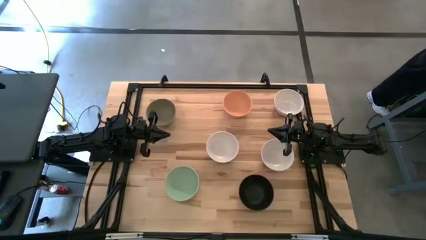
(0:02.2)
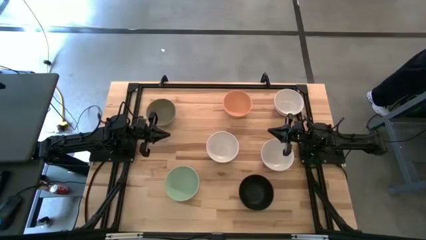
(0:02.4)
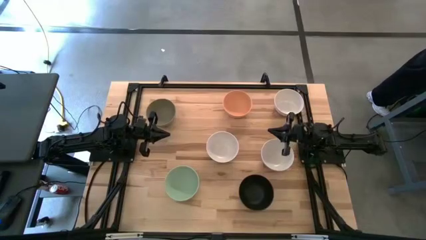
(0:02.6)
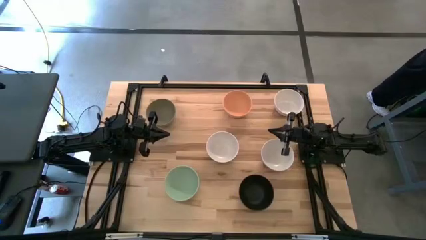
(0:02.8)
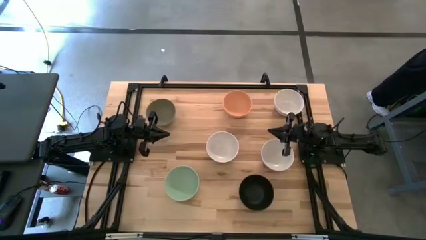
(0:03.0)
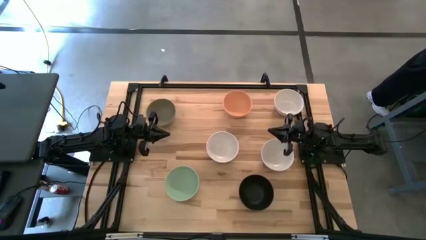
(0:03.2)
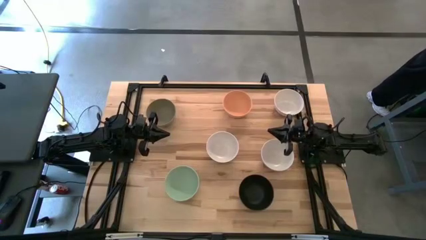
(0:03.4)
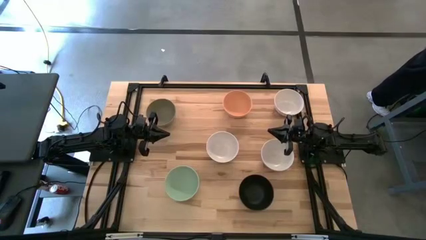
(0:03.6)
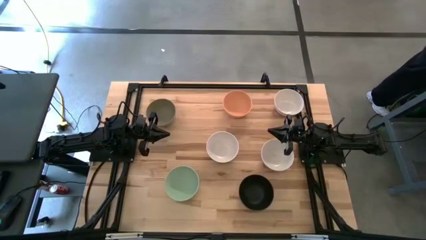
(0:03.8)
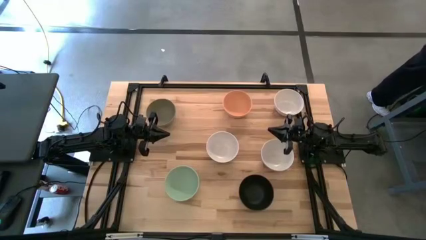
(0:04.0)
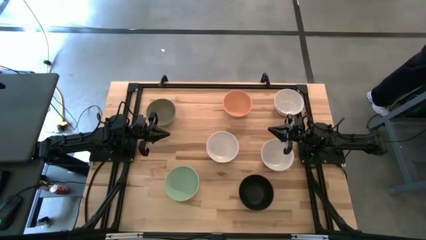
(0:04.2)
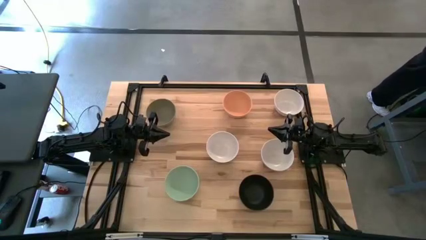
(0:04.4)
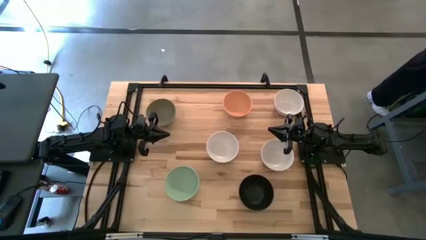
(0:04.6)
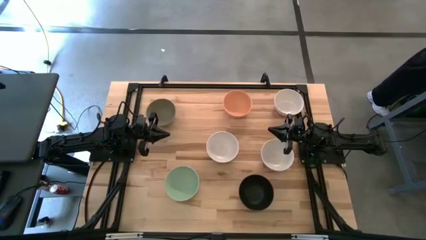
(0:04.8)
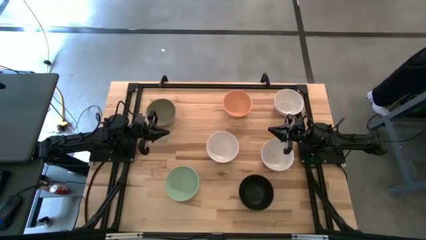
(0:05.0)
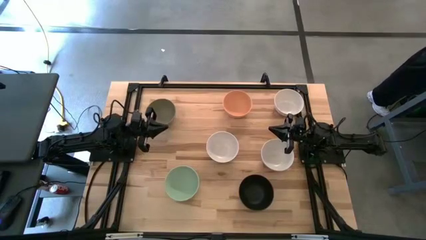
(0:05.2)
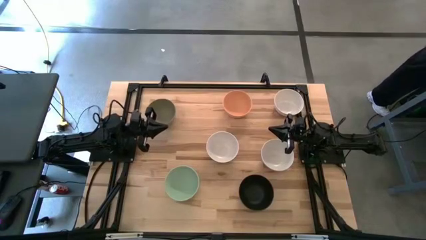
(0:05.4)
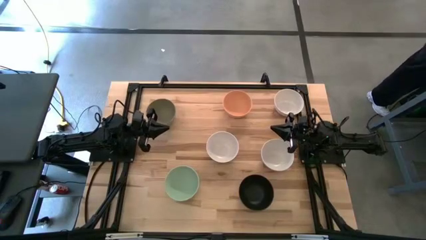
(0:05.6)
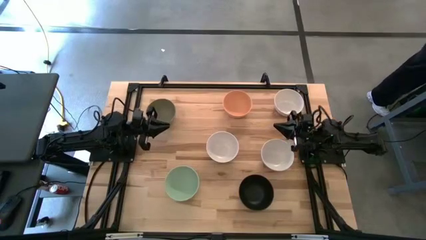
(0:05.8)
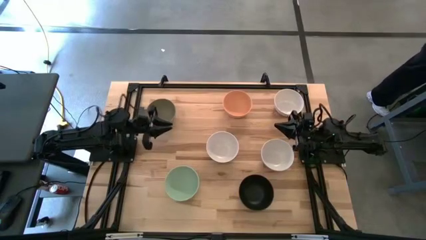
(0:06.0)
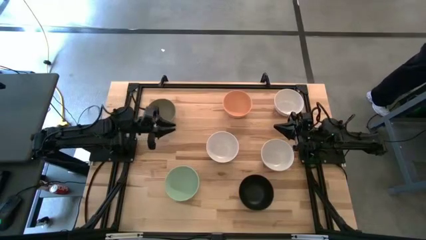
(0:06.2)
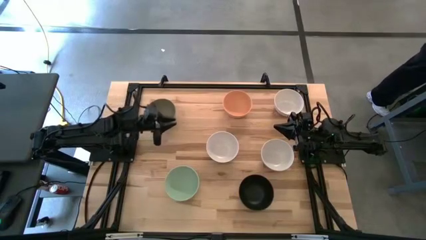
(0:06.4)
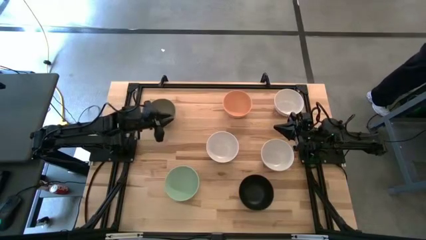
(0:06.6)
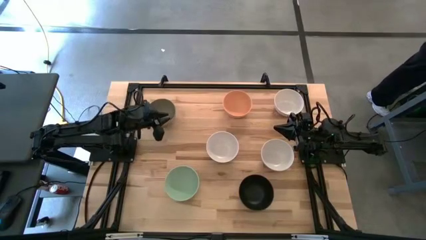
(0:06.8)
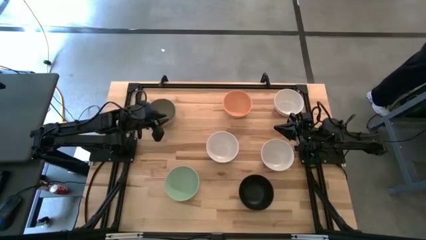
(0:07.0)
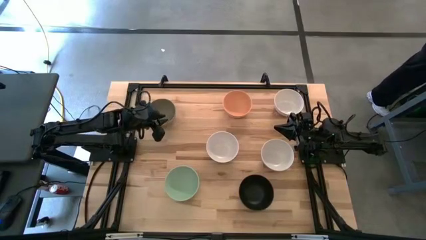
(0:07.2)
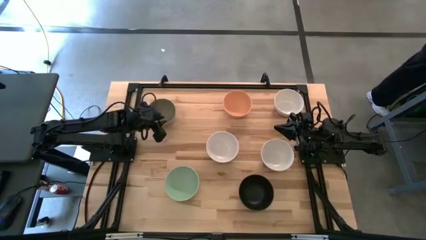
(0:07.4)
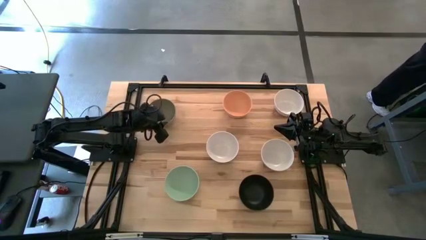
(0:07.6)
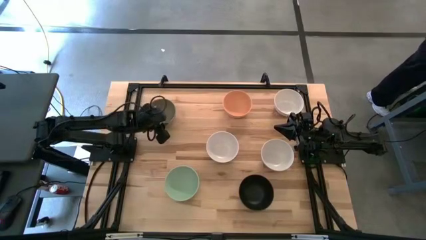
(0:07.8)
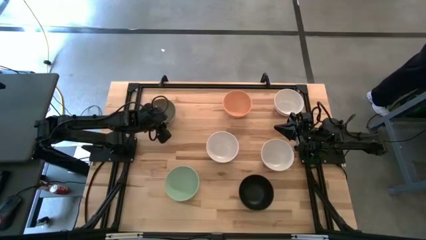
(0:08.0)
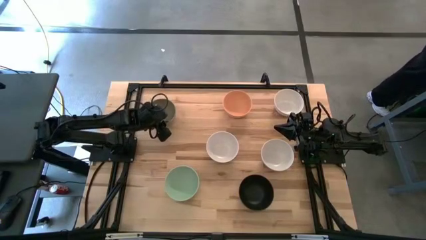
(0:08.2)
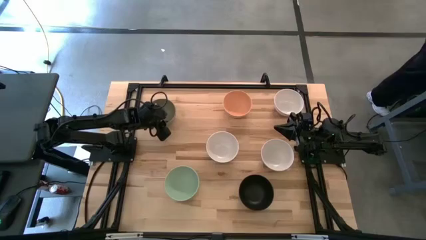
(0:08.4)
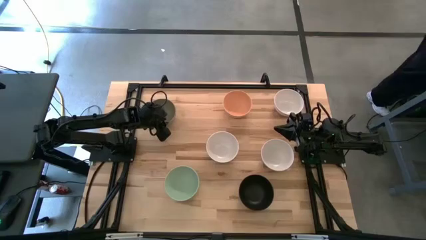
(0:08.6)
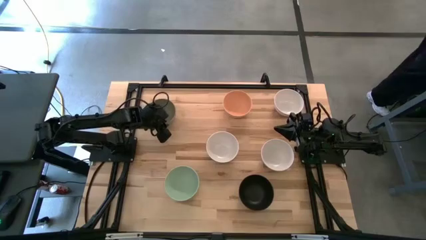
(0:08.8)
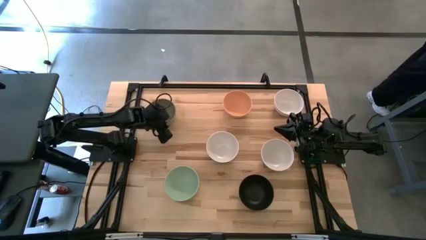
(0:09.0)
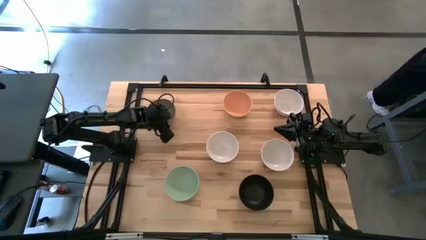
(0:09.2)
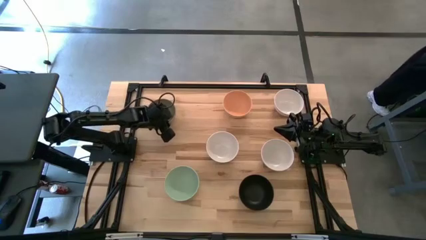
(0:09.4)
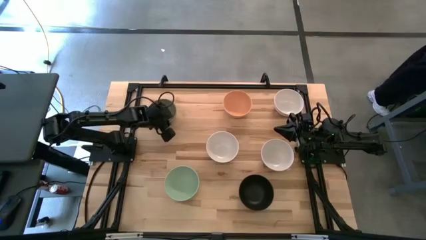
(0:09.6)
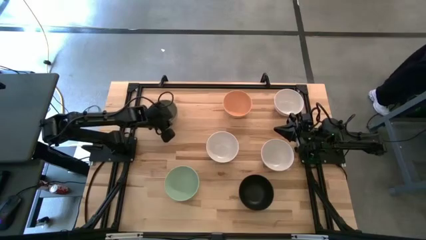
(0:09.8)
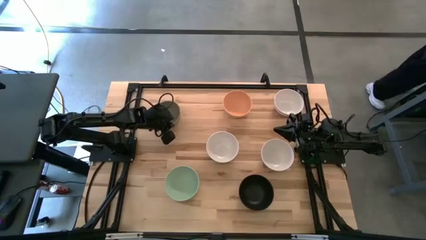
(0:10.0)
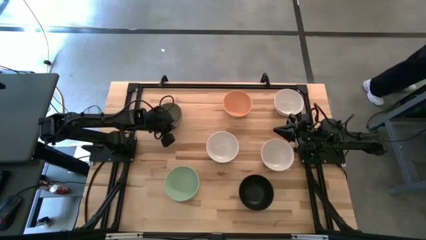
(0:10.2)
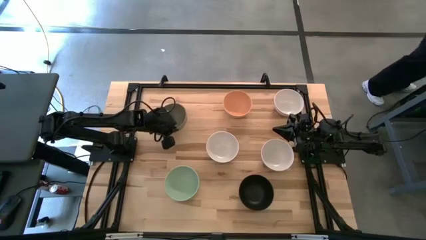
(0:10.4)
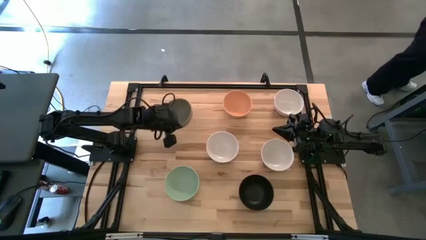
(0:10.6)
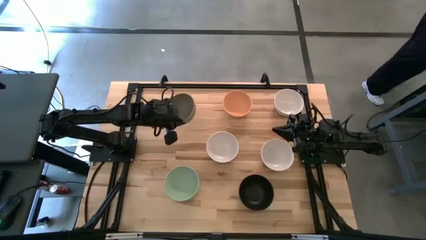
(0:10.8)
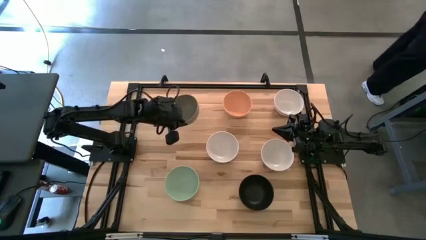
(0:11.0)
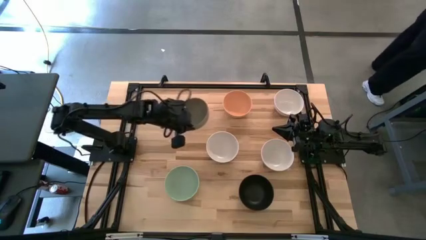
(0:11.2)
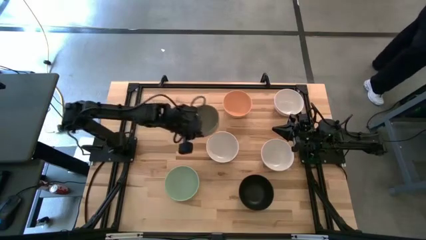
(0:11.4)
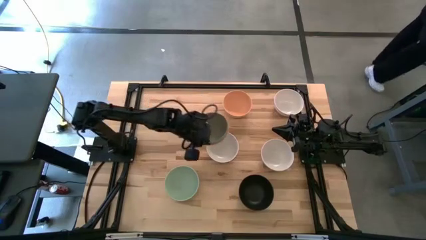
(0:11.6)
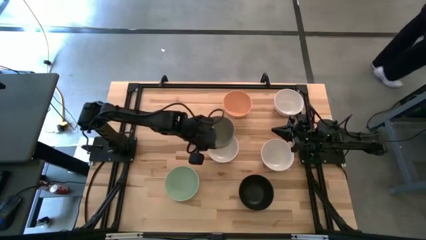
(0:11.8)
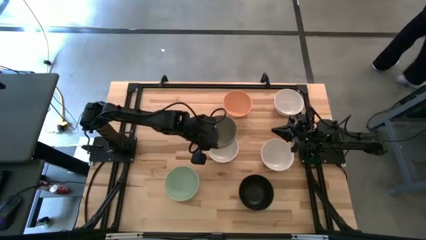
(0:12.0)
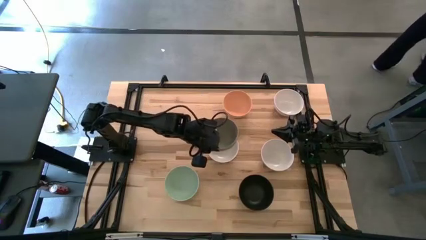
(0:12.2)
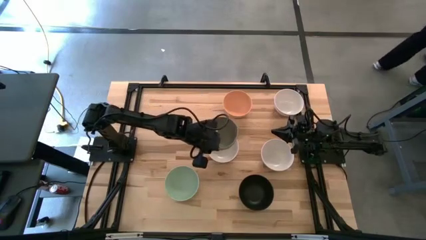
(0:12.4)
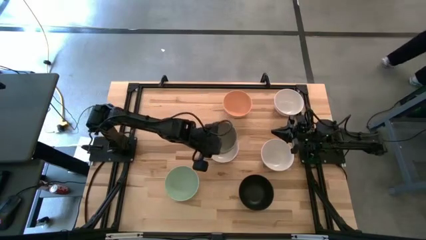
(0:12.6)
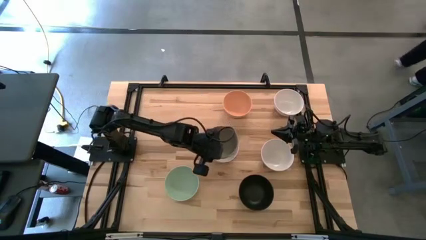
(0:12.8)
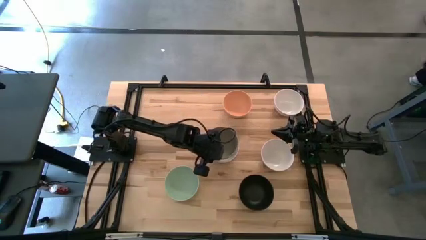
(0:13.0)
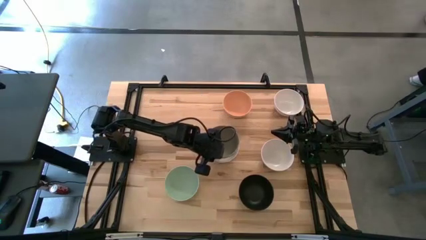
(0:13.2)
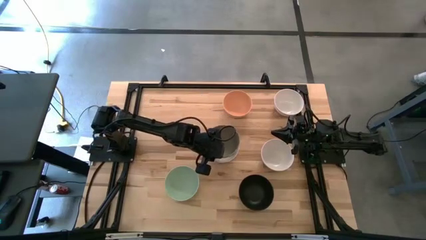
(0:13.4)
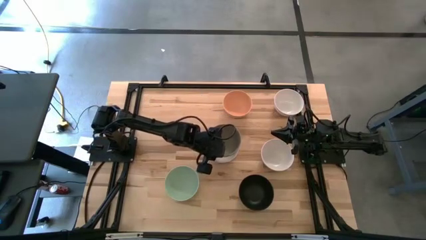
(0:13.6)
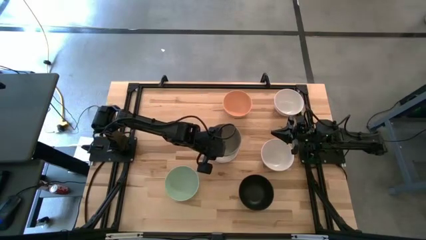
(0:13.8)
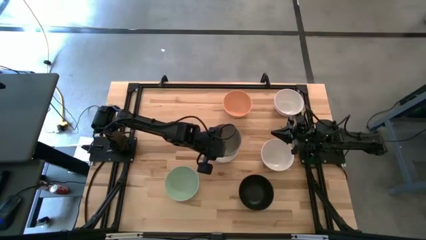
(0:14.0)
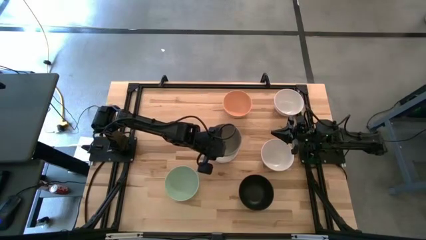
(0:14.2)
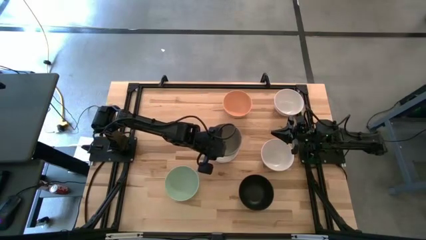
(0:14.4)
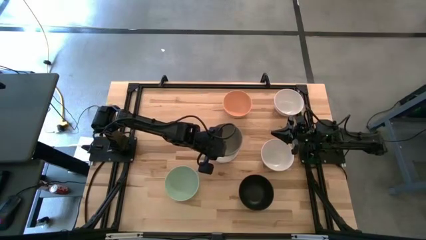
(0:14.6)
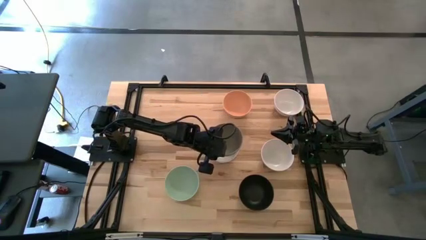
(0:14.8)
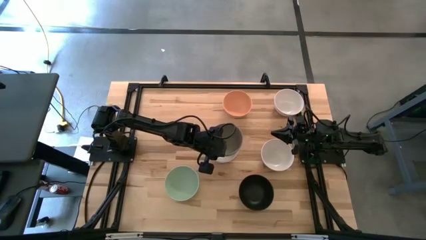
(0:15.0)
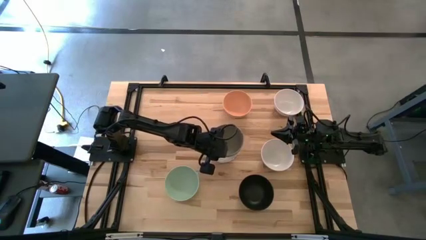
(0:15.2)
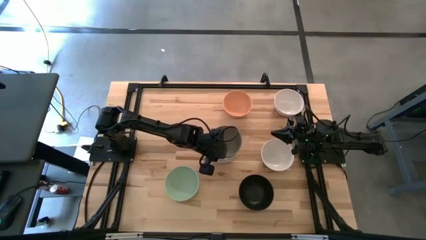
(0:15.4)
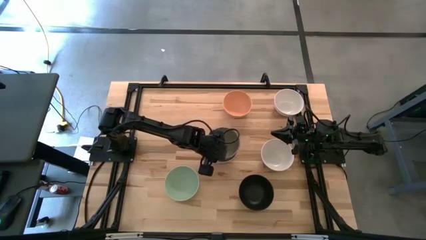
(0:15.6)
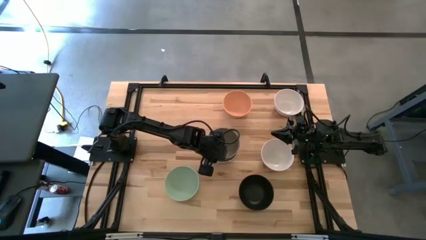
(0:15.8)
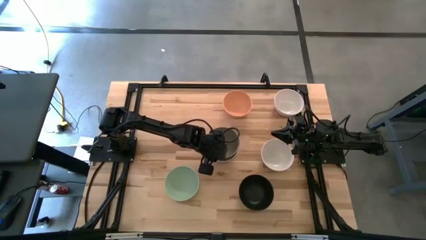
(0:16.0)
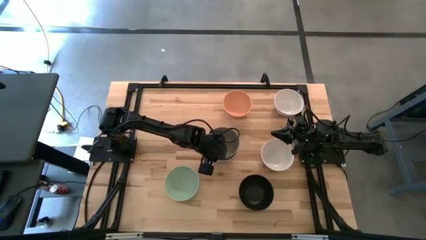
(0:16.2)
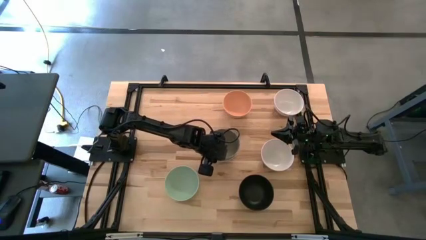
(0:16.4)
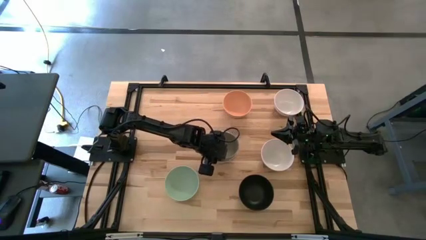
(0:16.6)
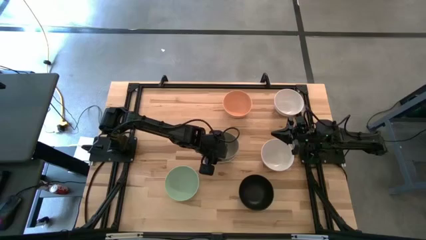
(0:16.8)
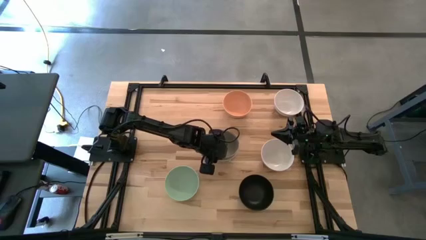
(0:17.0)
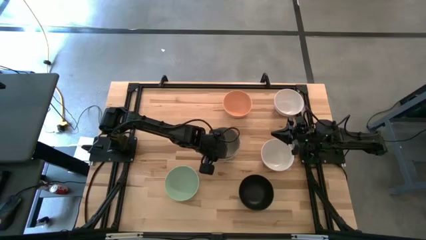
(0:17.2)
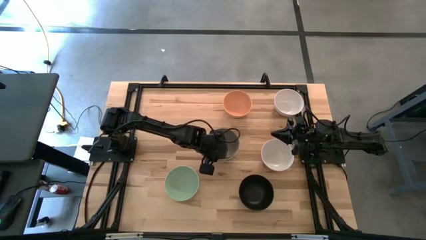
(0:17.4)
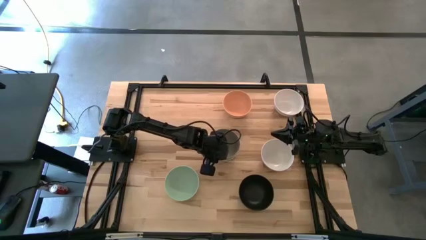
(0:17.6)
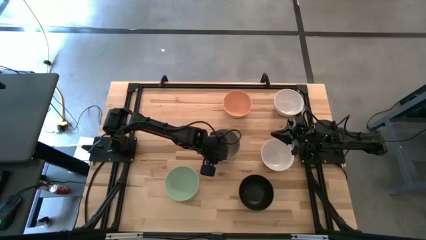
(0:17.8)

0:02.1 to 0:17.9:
Task: Nest bowls inside each other
Stack the gray bowl on the center white bowl
